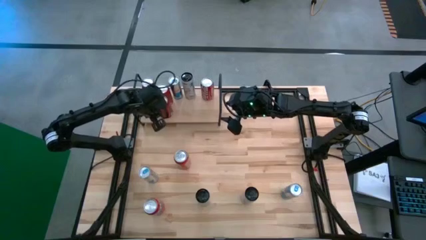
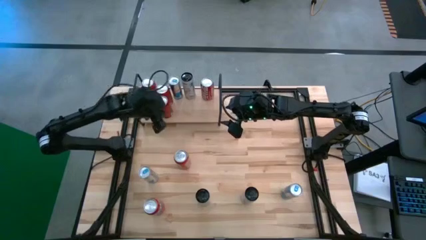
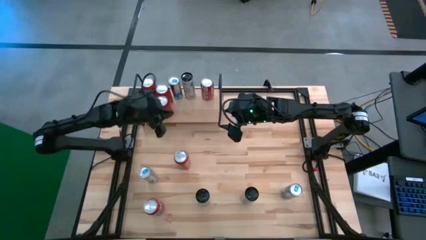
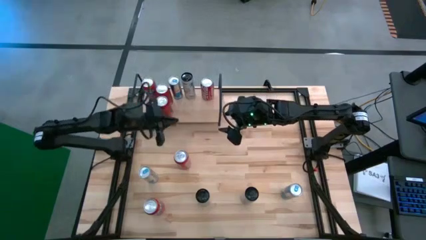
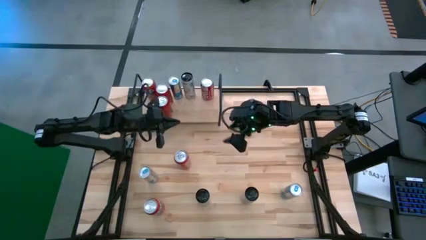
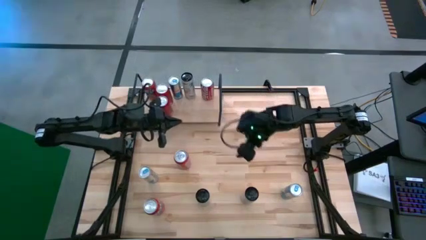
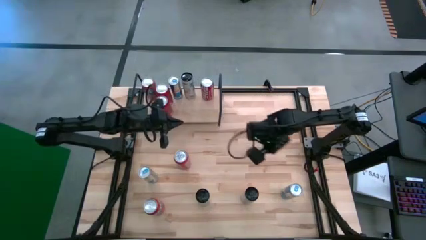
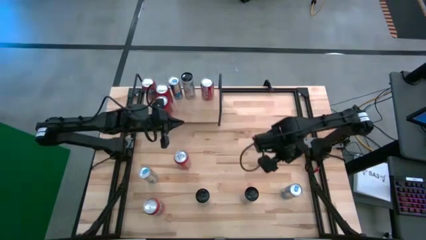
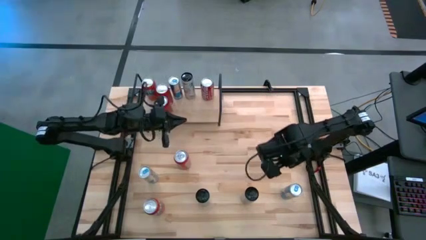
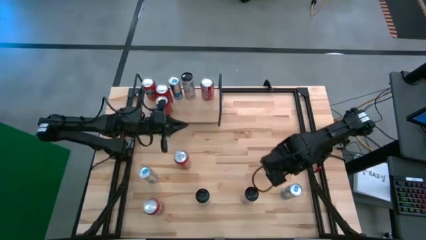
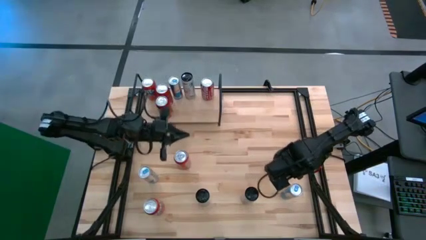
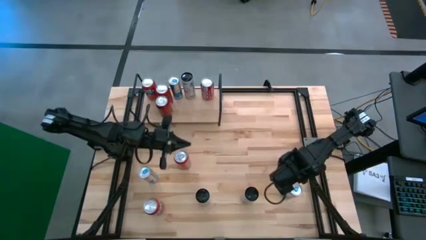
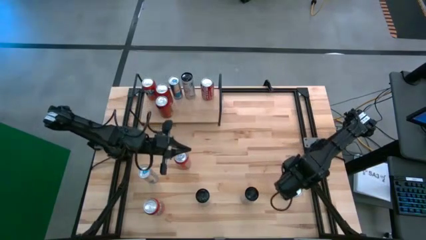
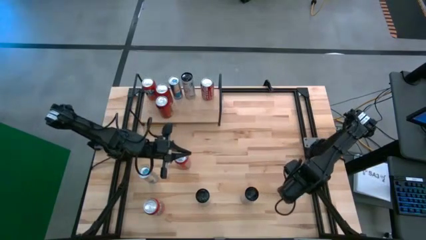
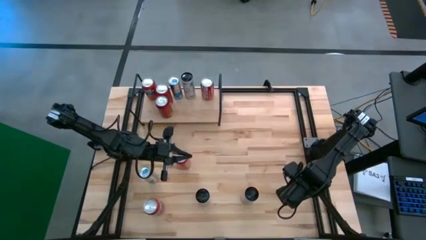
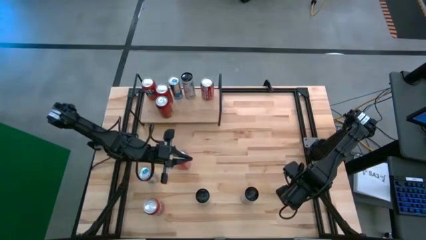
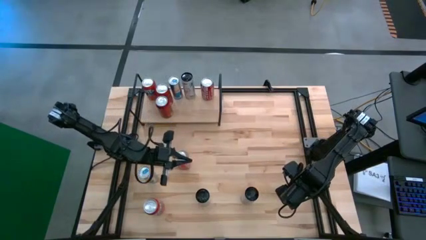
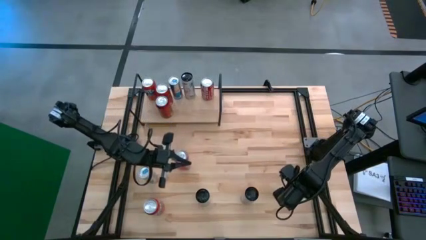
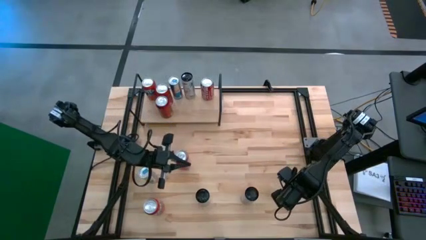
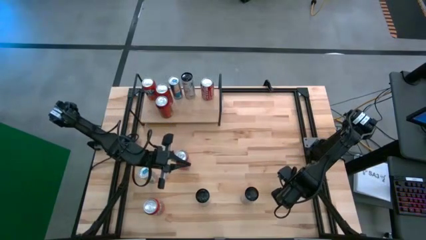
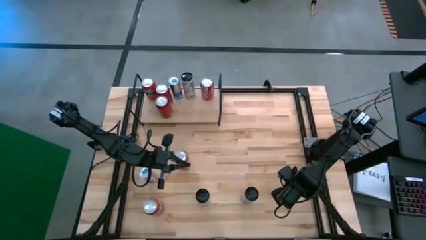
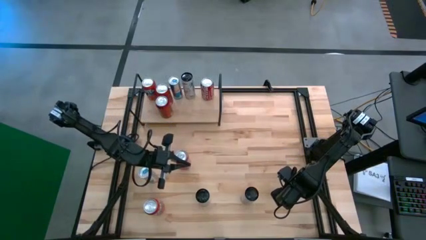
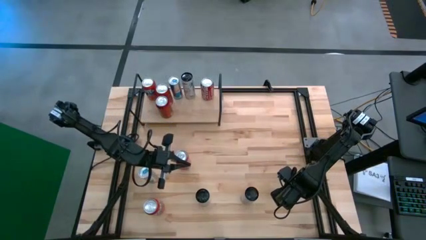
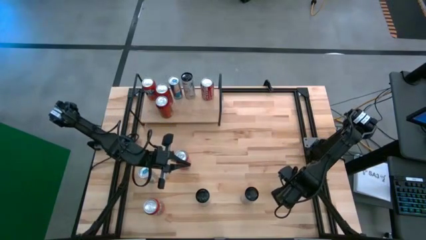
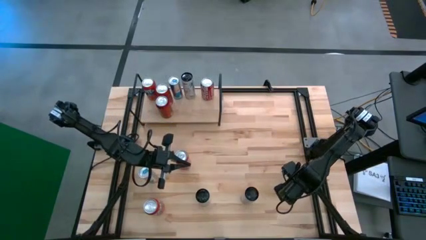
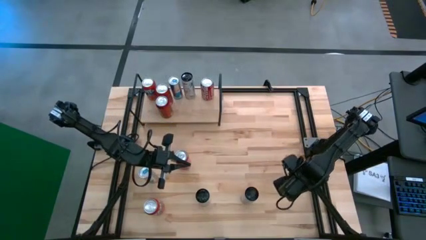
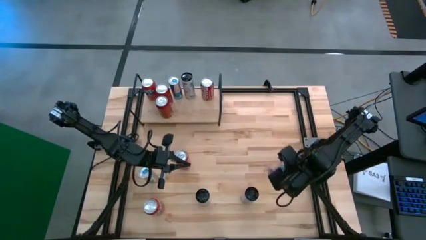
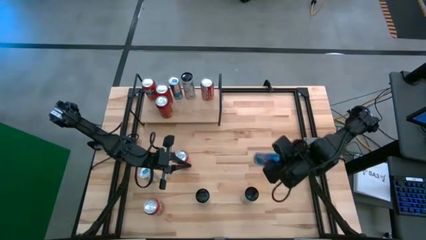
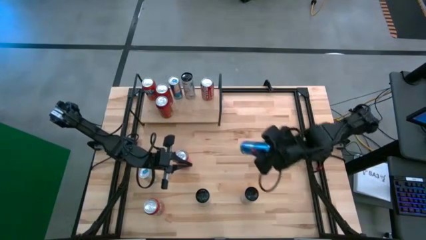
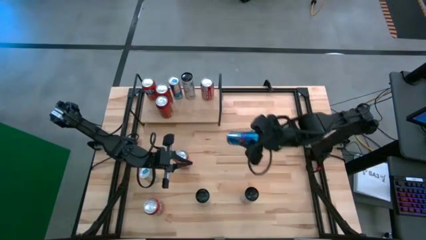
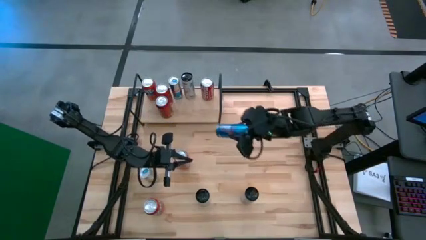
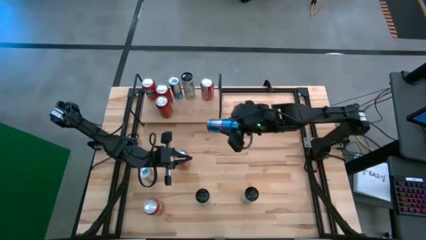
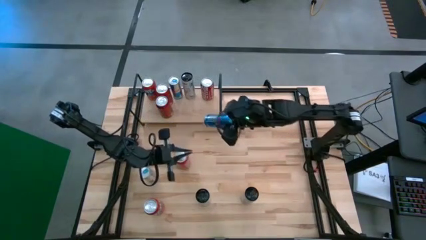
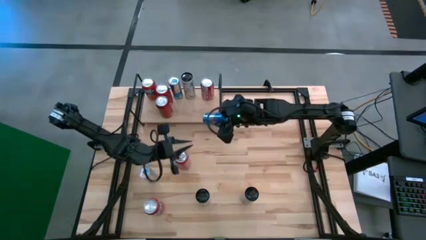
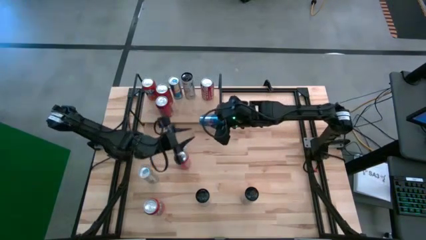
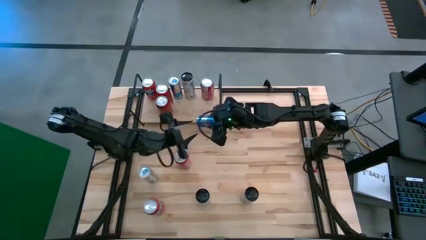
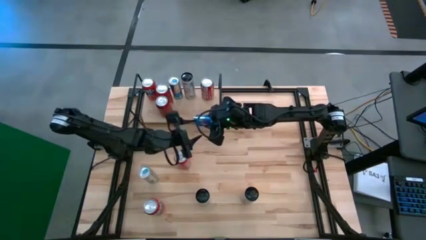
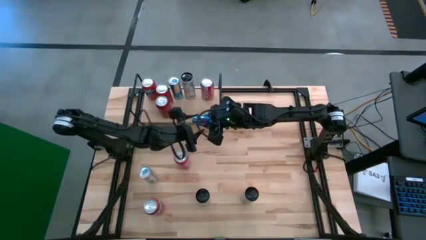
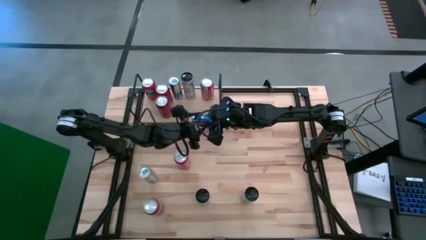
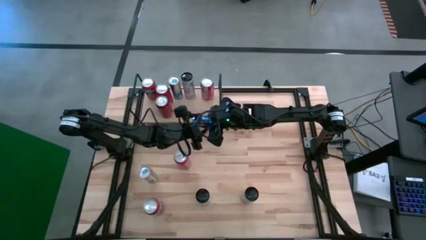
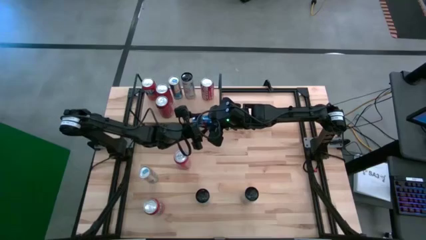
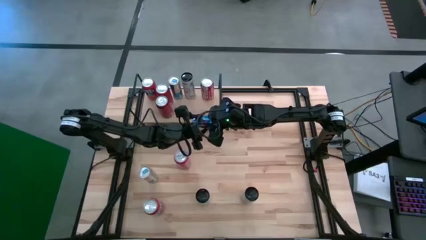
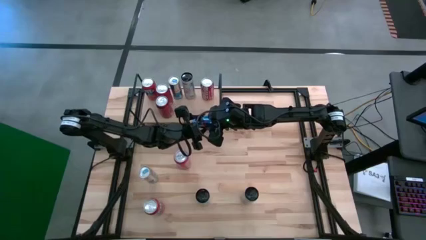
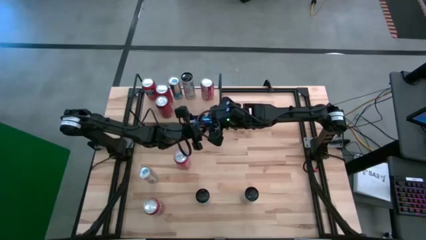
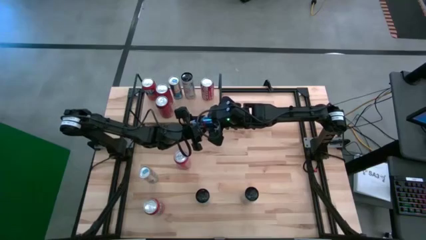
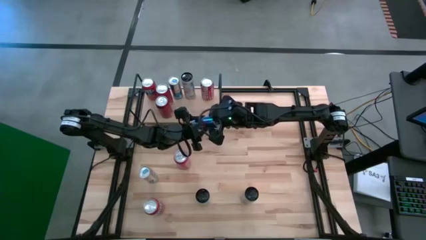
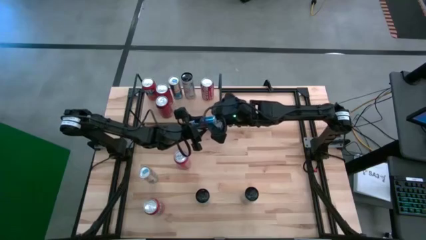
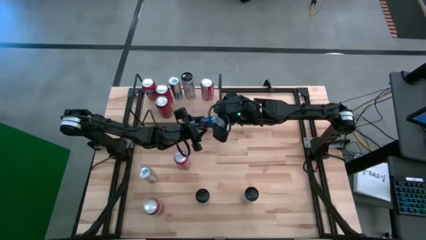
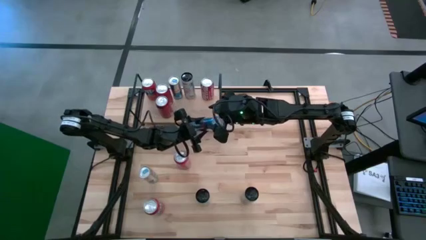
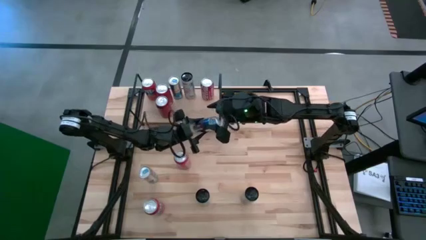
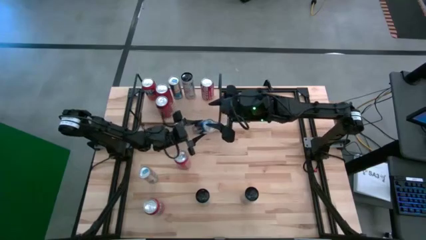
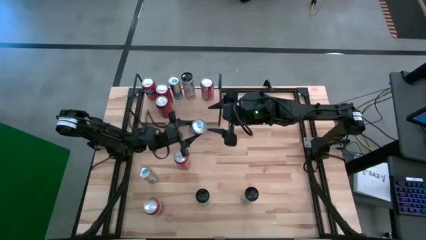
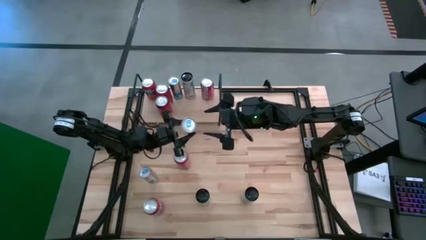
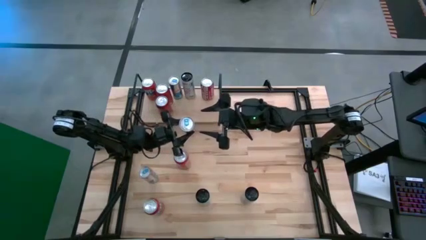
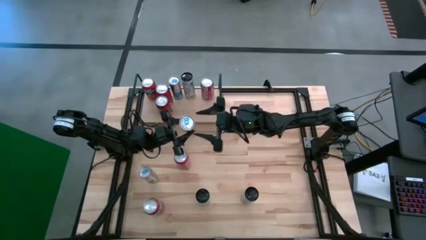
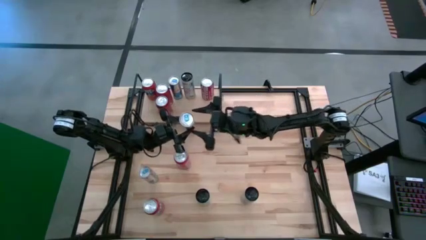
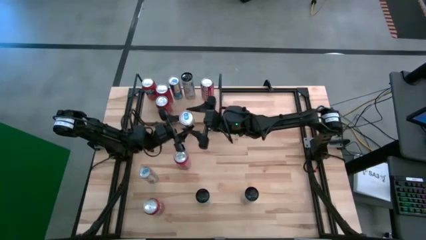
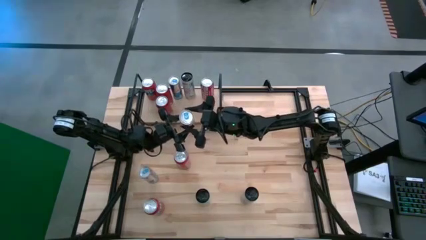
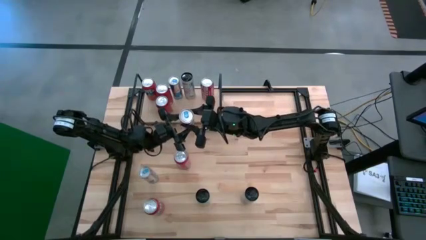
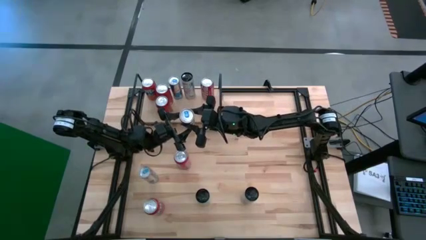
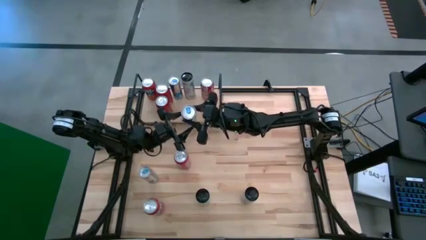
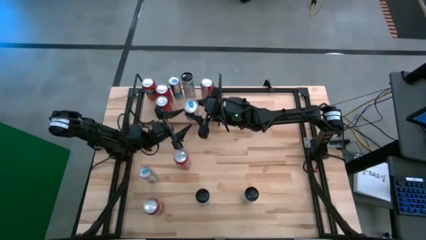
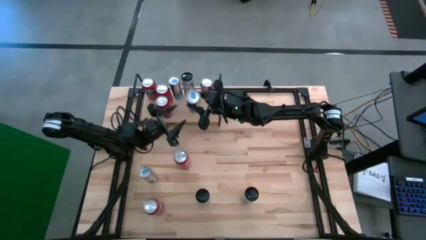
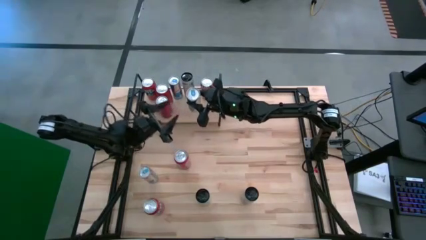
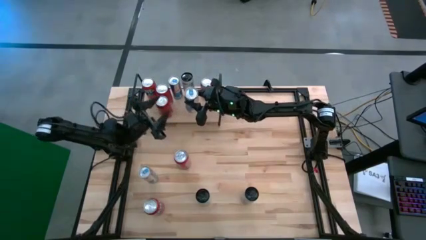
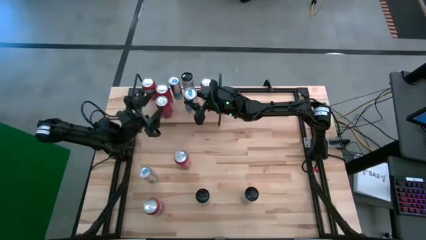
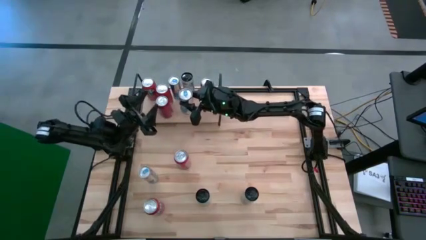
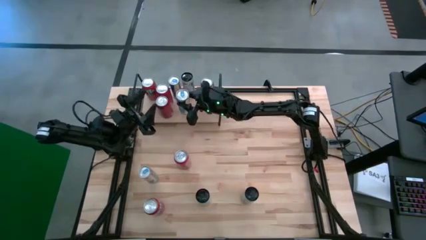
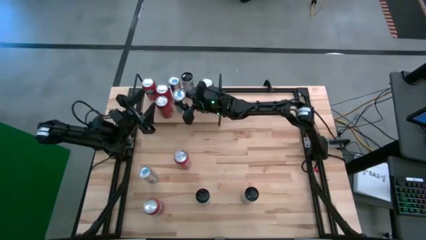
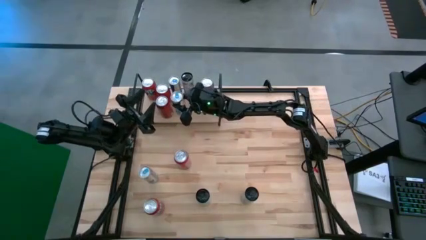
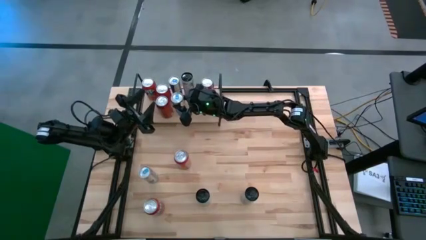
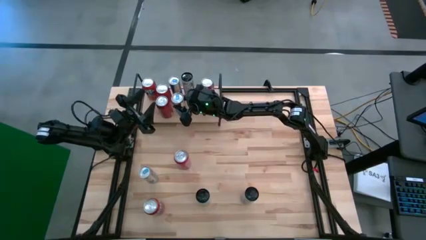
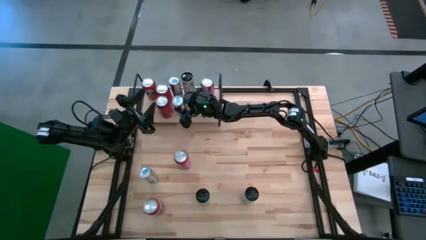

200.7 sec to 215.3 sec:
Task: Place canned beverage on shelf
Put the right blue soda can on the shelf aligned with the other blue soda can
